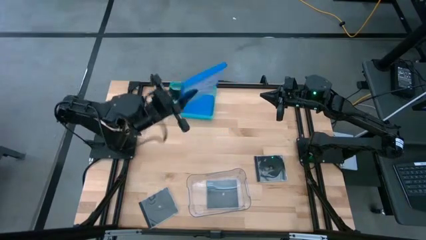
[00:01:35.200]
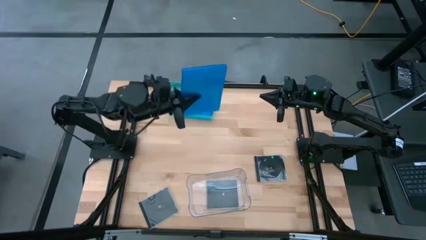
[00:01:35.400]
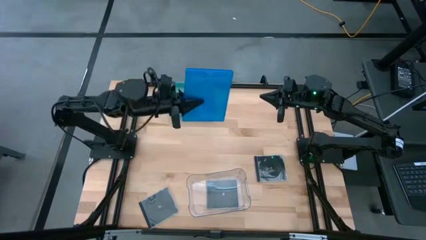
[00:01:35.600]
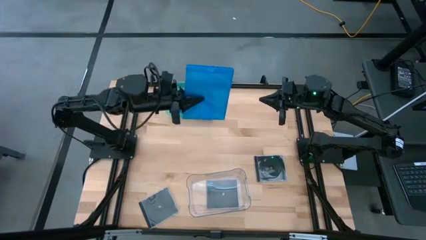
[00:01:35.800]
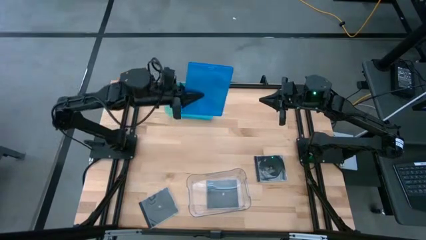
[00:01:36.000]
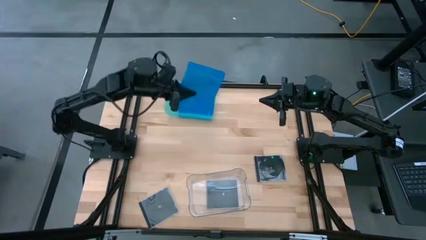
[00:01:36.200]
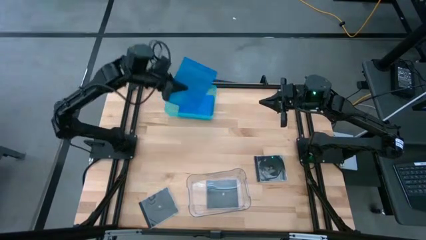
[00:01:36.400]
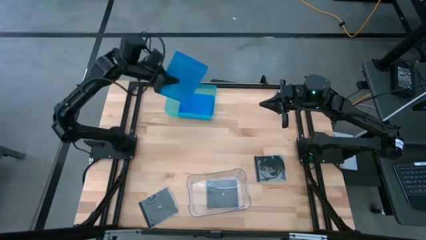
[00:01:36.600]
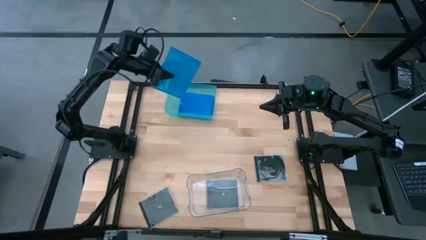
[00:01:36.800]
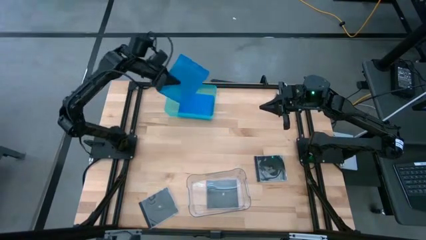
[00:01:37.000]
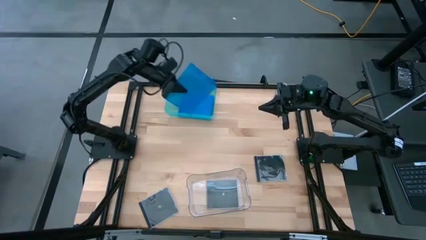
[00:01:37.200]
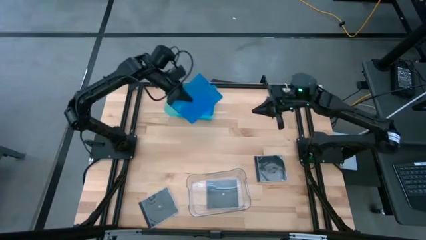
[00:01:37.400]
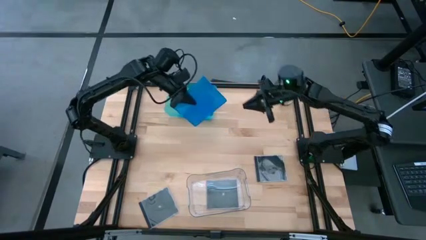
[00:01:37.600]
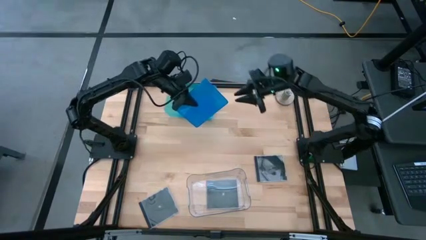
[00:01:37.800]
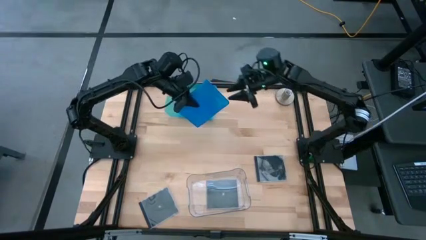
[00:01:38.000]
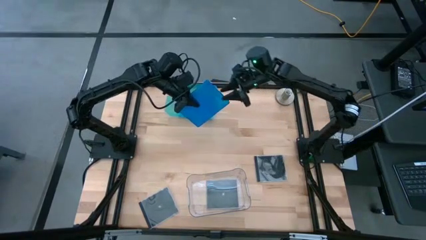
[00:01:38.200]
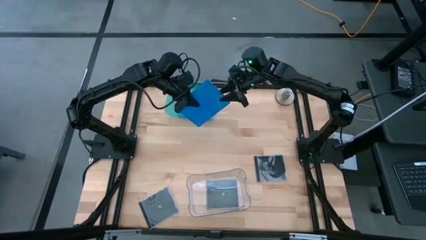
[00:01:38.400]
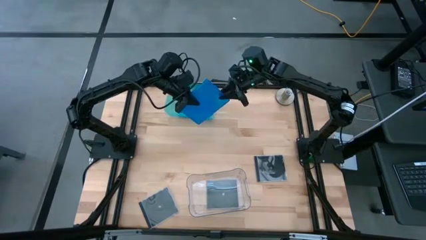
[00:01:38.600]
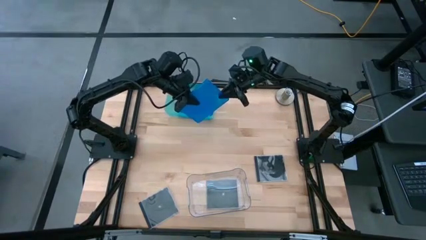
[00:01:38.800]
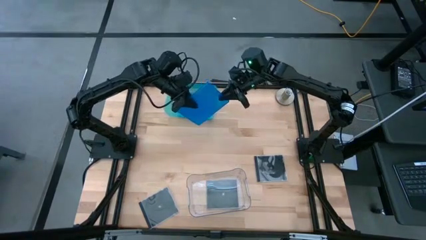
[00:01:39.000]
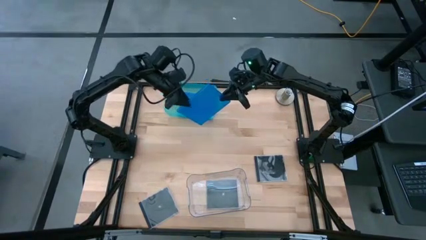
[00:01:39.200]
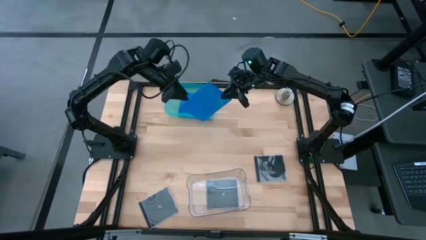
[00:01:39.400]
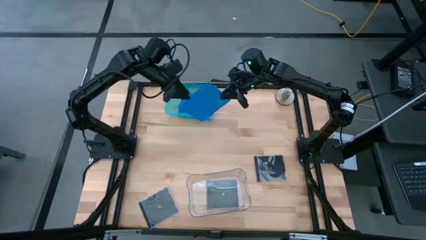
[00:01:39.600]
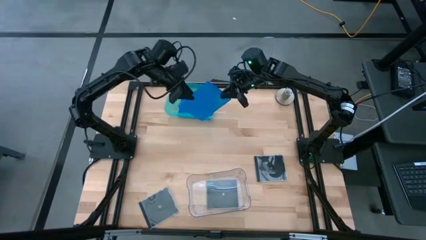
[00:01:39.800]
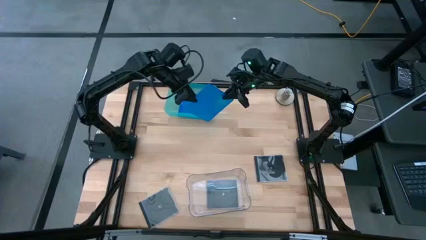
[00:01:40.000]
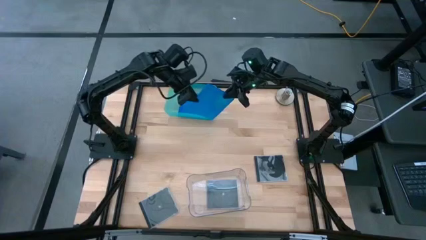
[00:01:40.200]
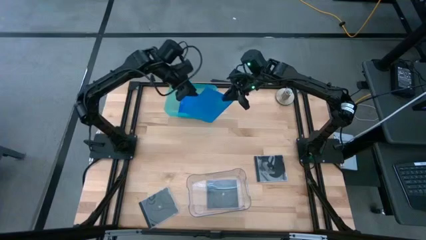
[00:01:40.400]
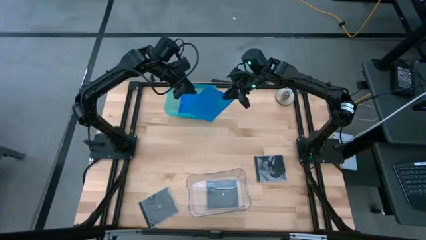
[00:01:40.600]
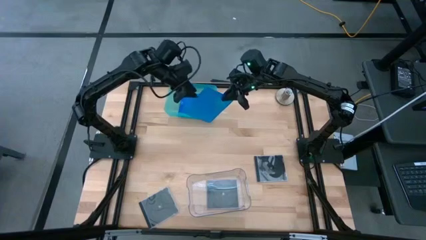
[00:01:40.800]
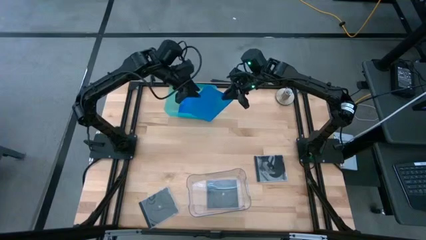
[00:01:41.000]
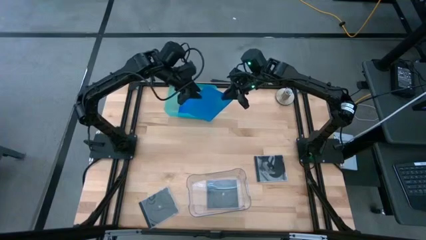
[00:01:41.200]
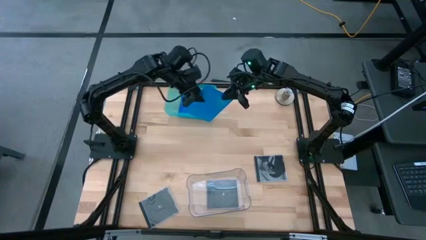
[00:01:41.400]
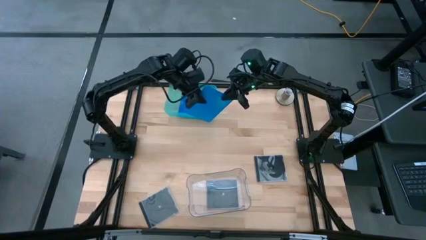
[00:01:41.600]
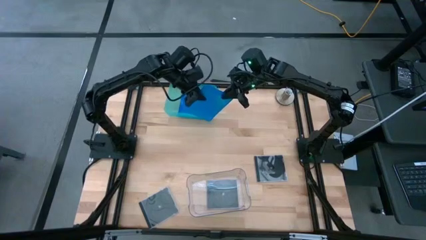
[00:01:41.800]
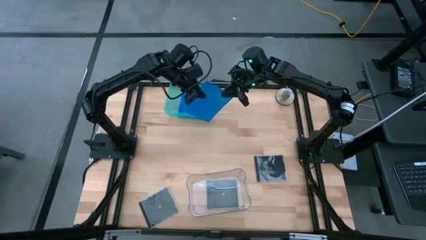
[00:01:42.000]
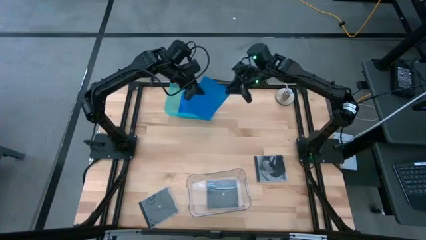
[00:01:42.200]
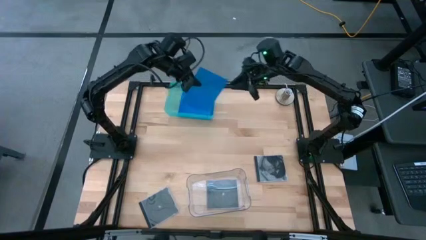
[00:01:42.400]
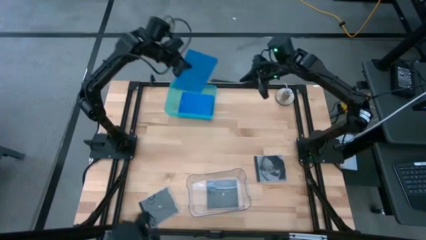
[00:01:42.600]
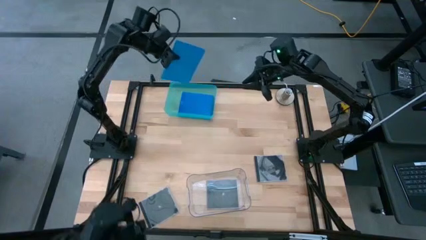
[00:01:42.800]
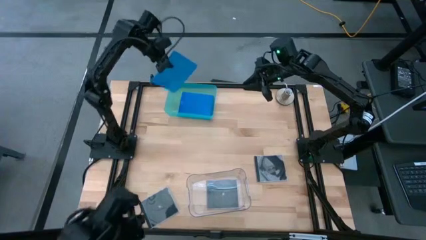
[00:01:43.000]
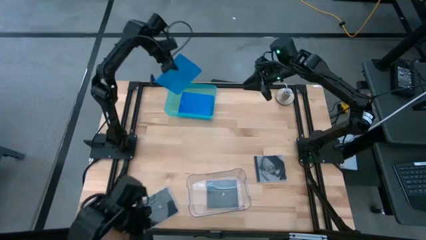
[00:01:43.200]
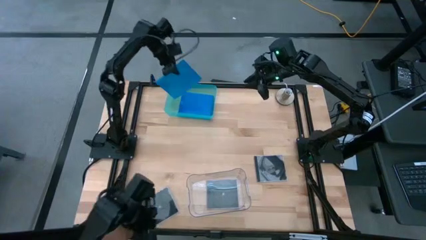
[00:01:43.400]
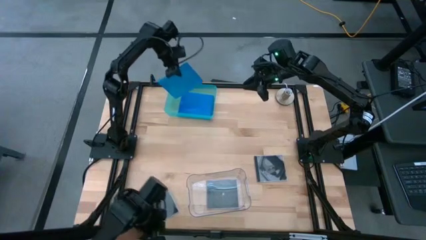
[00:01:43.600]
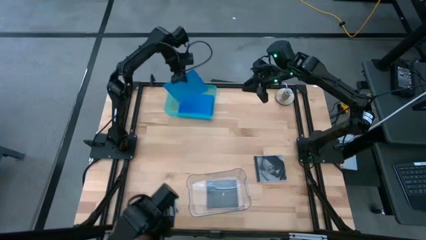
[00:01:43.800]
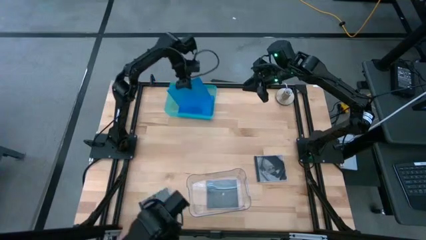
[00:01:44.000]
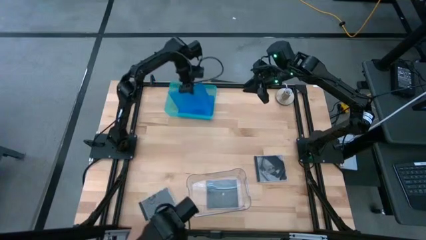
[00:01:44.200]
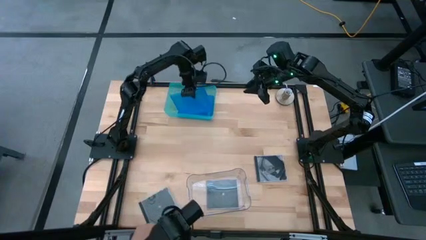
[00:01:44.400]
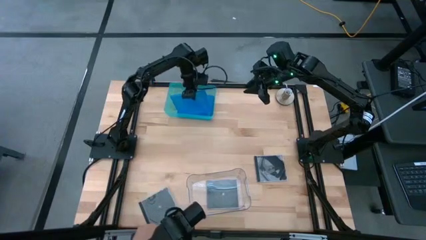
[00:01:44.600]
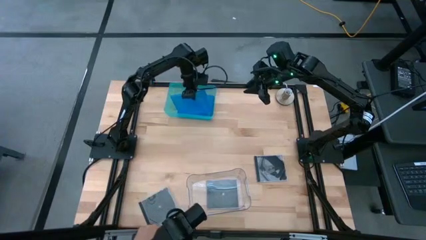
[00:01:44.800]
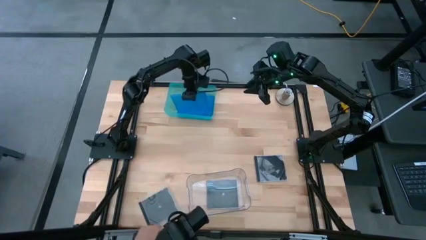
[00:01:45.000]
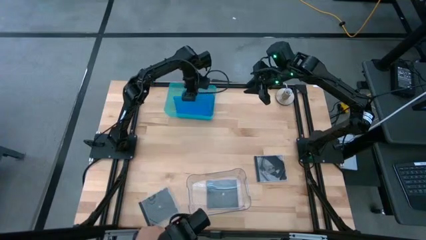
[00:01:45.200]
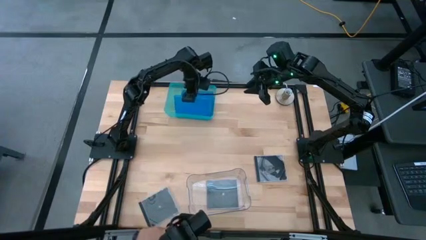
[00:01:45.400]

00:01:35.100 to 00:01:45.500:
Task: Pick & place jewel cases by type
Put the blue CD case into the green bin
